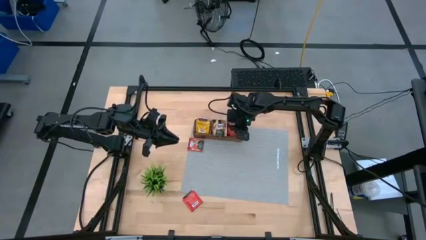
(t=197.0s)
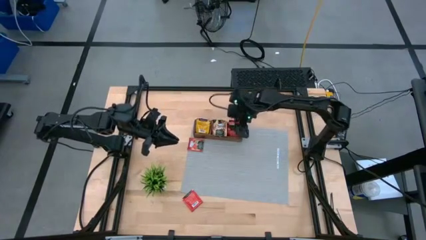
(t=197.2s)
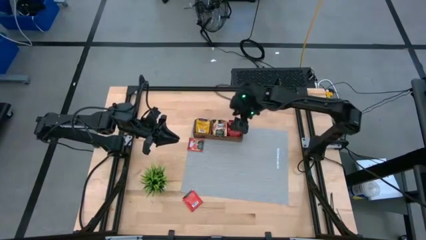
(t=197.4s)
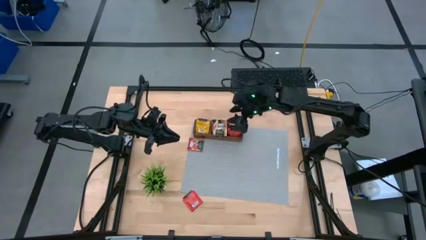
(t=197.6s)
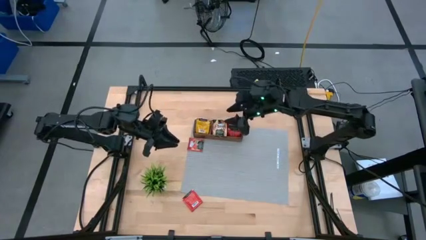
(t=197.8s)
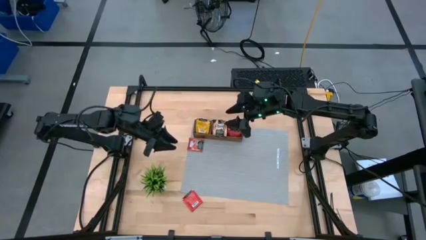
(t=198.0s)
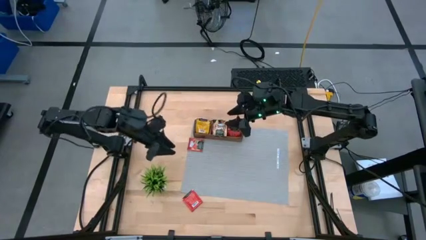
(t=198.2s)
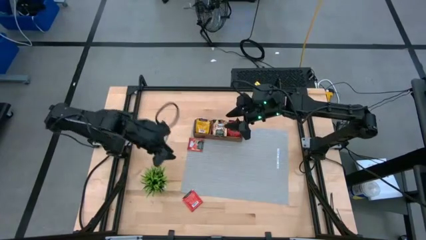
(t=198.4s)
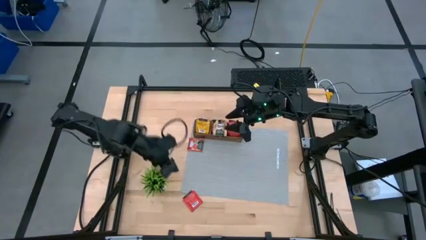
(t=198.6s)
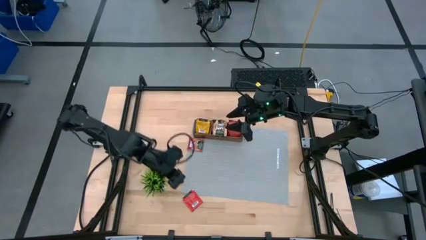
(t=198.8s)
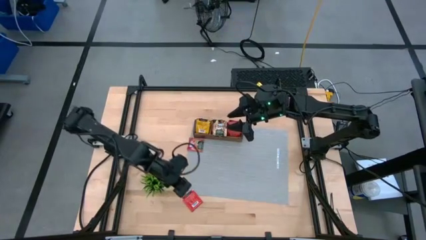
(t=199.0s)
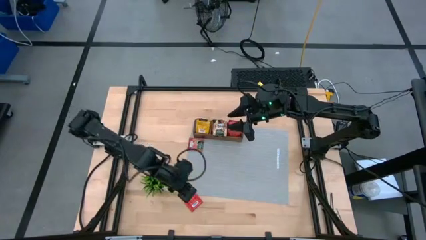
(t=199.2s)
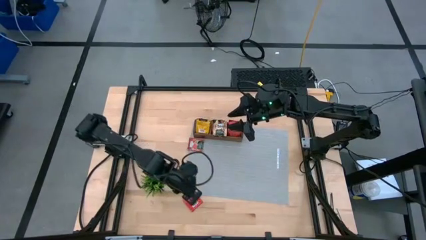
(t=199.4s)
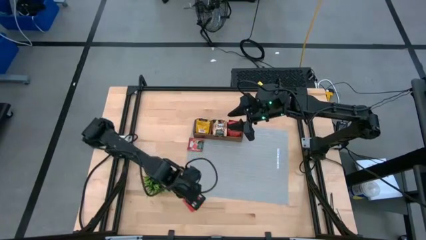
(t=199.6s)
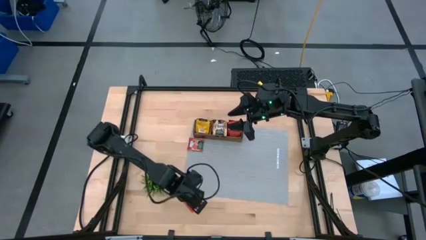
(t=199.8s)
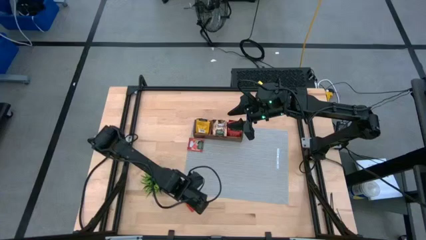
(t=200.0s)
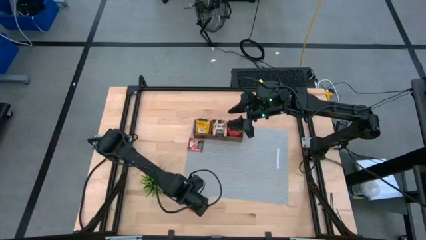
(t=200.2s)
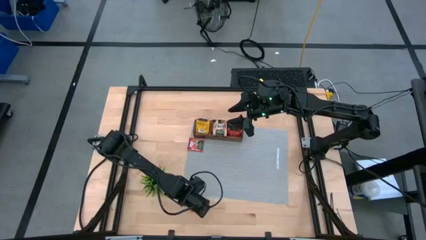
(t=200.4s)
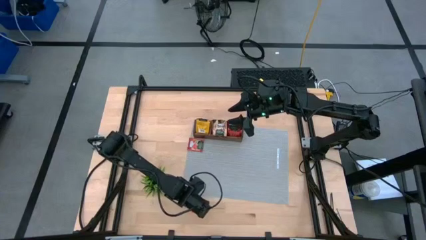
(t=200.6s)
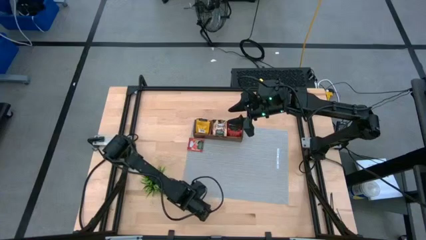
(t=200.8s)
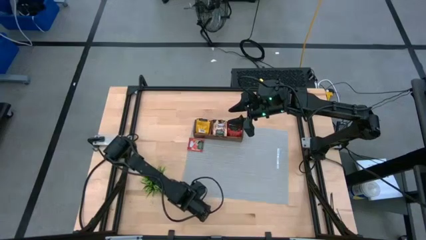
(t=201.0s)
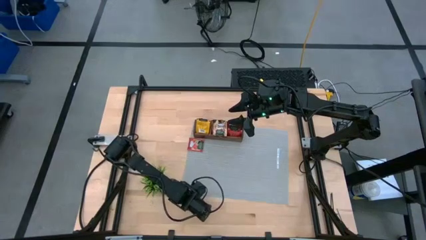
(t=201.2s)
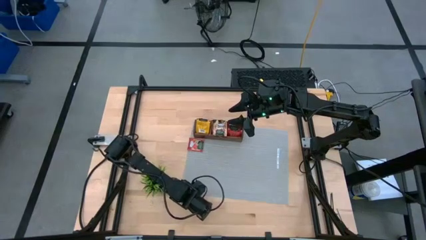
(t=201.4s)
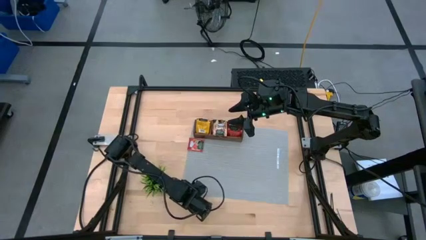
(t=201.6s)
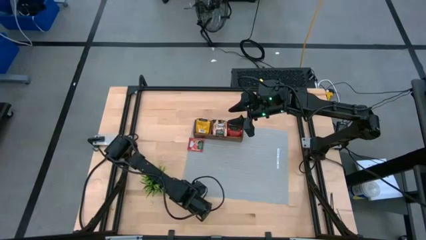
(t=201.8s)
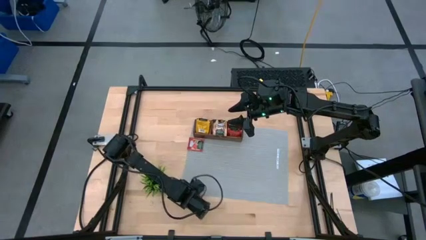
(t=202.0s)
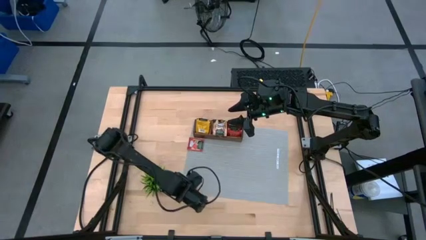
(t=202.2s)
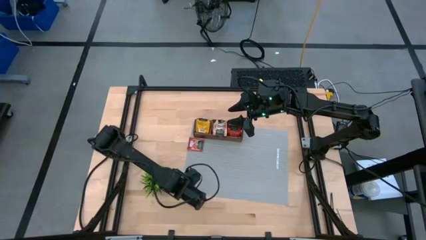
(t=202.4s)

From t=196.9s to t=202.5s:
Task: Pick & Place Tea
Put the red tea bag into the right section of the wooden organizer

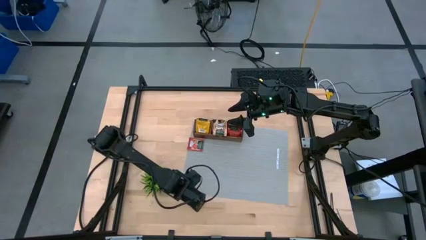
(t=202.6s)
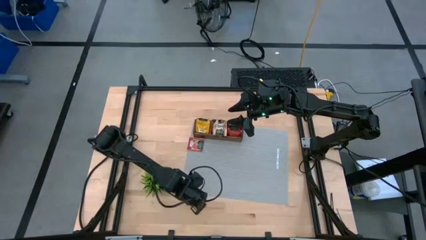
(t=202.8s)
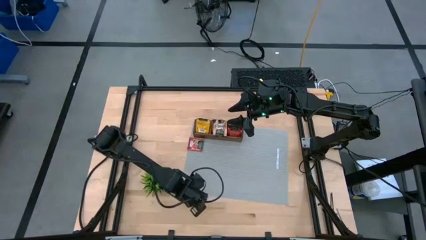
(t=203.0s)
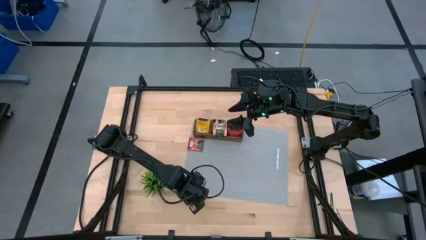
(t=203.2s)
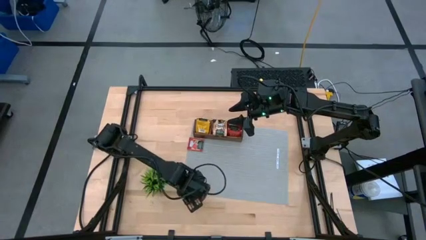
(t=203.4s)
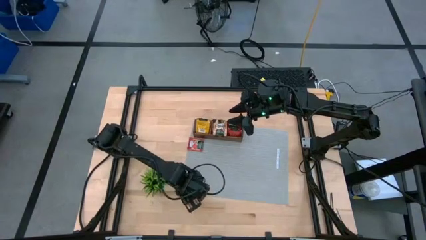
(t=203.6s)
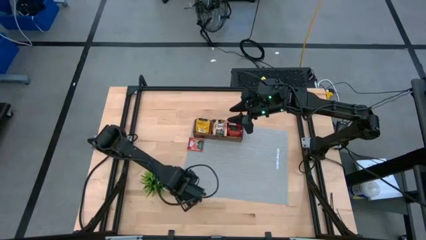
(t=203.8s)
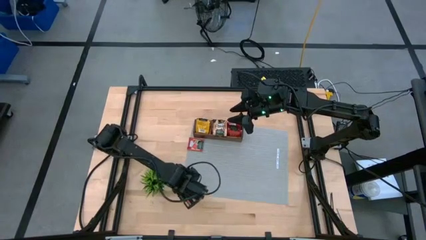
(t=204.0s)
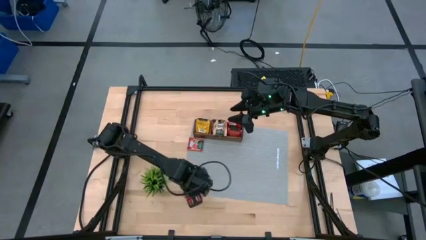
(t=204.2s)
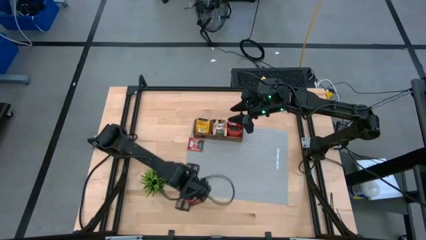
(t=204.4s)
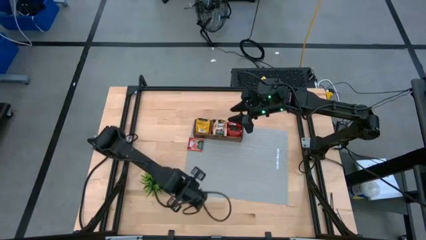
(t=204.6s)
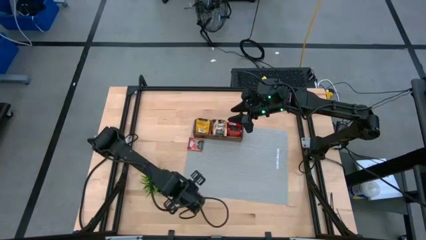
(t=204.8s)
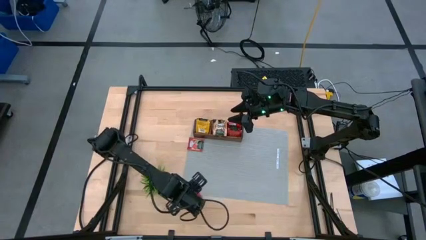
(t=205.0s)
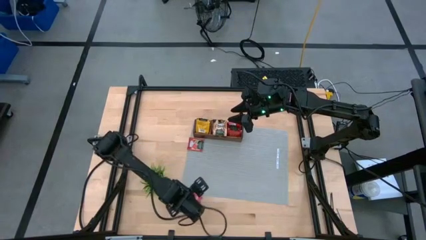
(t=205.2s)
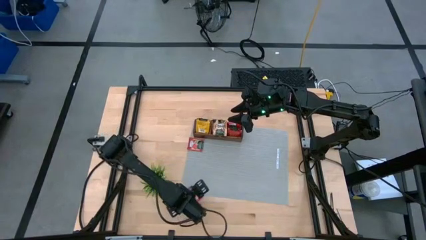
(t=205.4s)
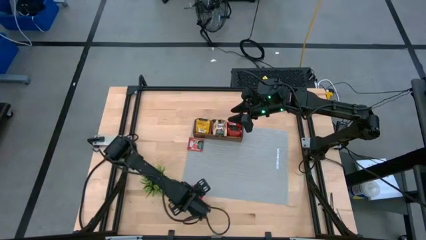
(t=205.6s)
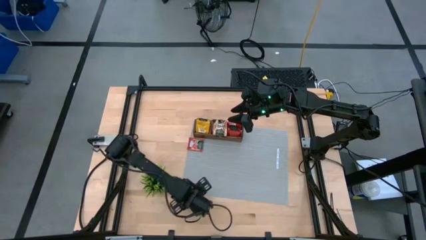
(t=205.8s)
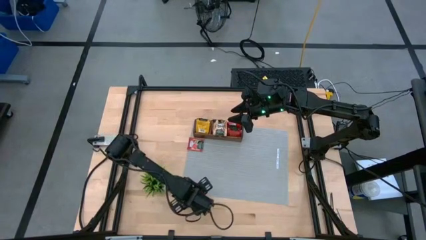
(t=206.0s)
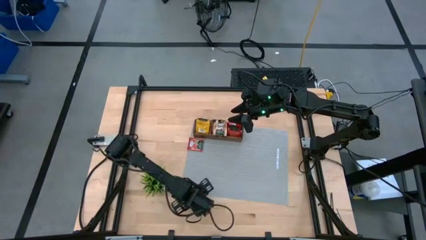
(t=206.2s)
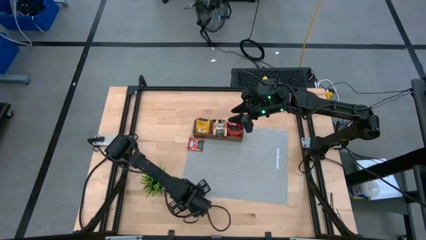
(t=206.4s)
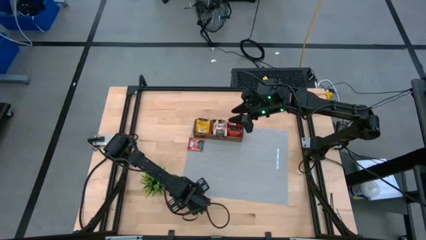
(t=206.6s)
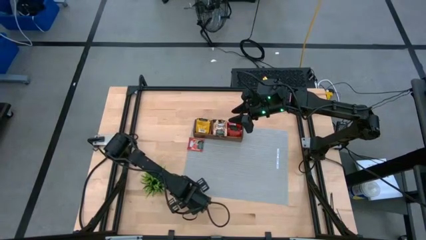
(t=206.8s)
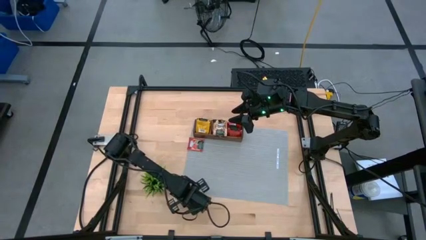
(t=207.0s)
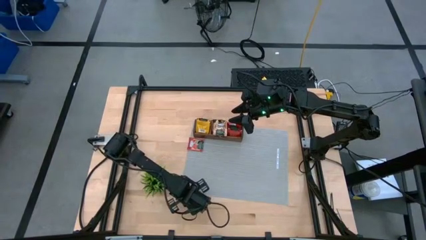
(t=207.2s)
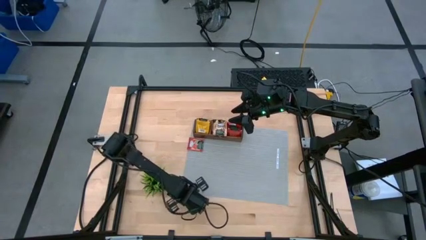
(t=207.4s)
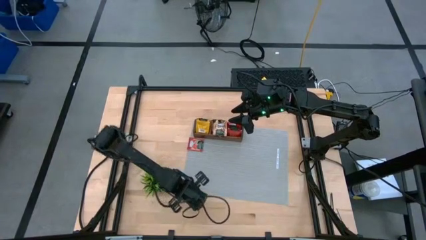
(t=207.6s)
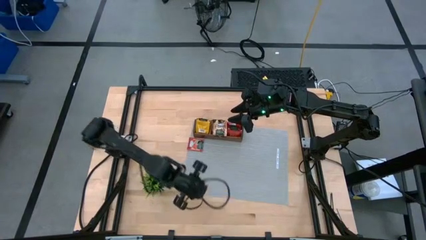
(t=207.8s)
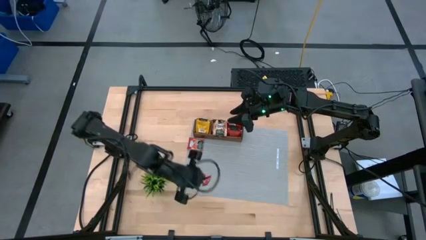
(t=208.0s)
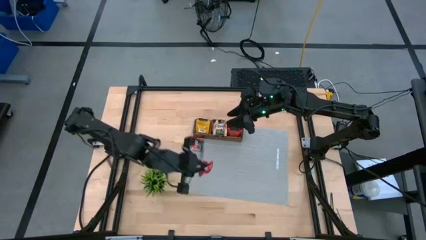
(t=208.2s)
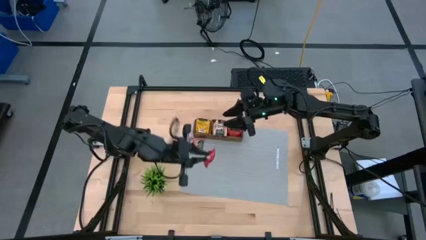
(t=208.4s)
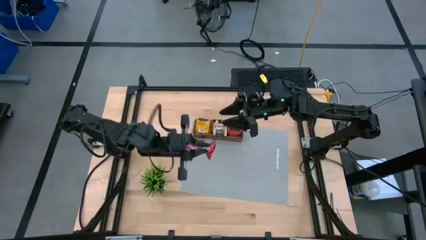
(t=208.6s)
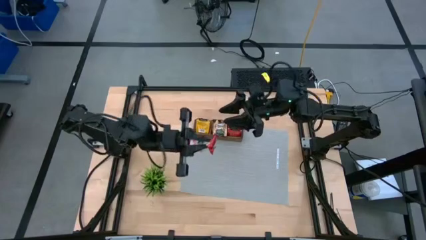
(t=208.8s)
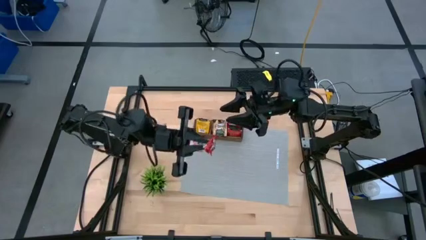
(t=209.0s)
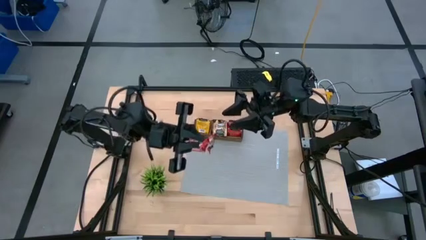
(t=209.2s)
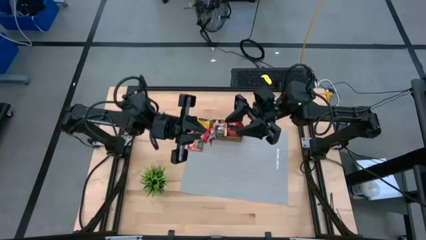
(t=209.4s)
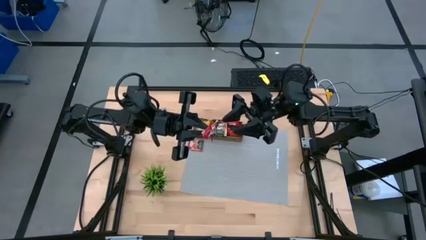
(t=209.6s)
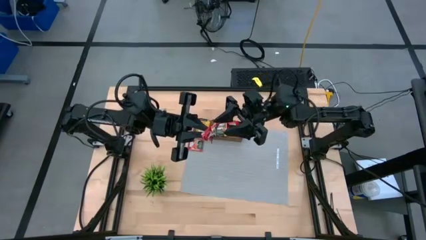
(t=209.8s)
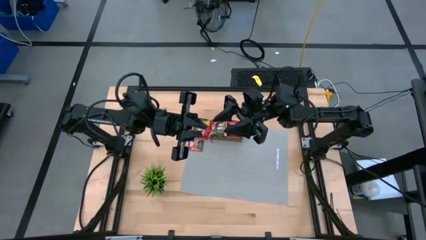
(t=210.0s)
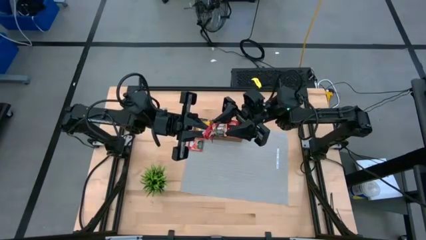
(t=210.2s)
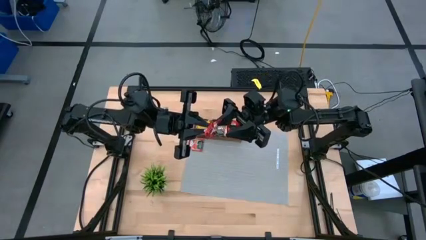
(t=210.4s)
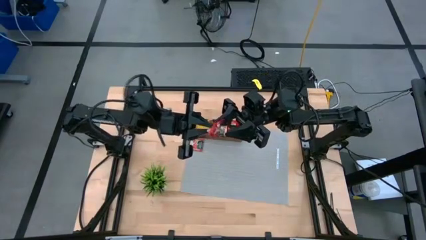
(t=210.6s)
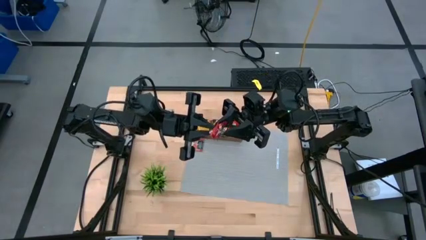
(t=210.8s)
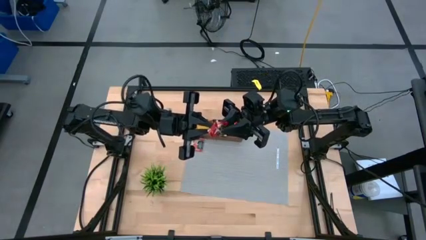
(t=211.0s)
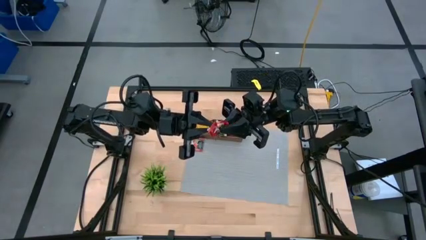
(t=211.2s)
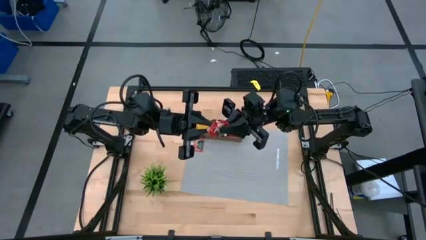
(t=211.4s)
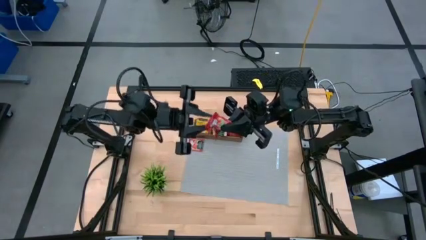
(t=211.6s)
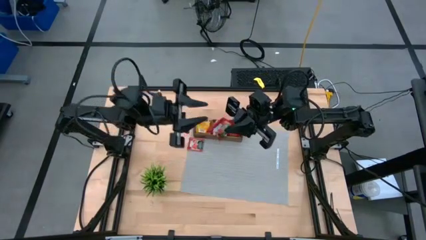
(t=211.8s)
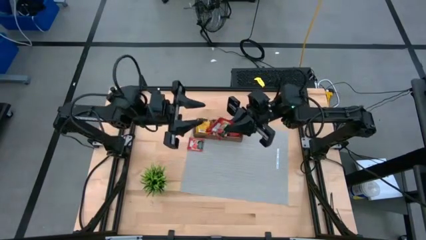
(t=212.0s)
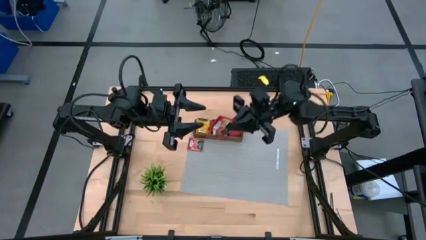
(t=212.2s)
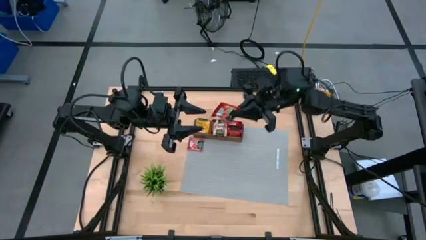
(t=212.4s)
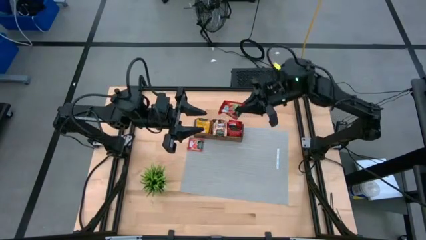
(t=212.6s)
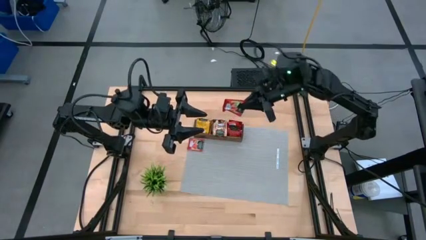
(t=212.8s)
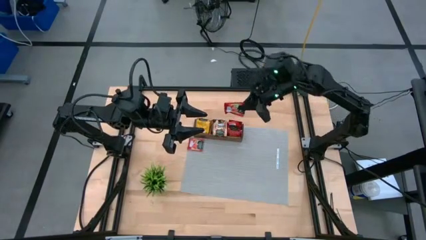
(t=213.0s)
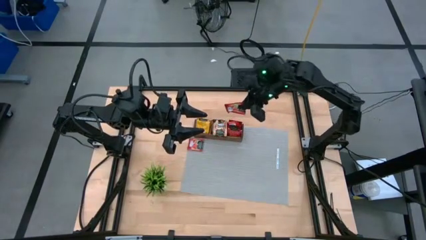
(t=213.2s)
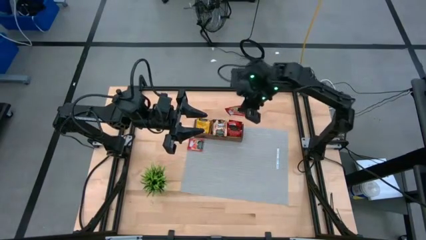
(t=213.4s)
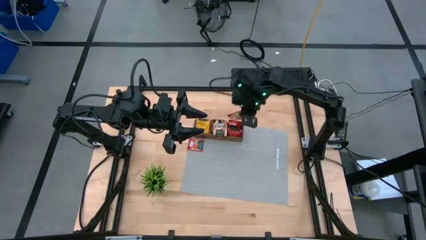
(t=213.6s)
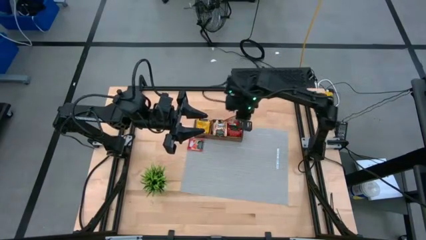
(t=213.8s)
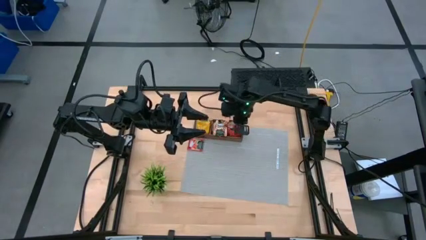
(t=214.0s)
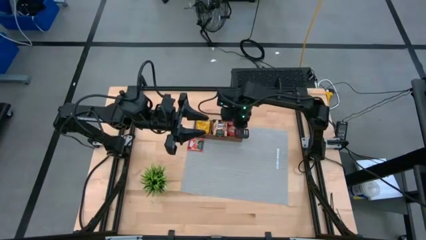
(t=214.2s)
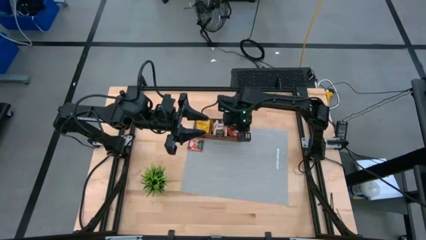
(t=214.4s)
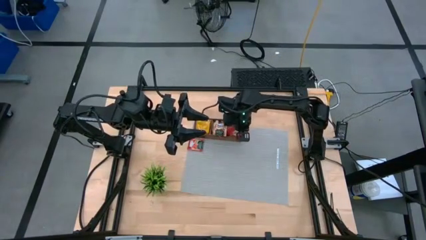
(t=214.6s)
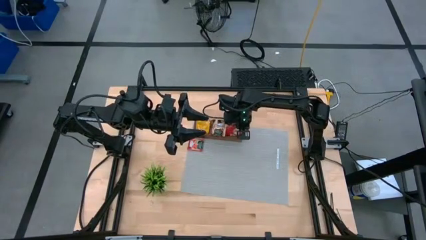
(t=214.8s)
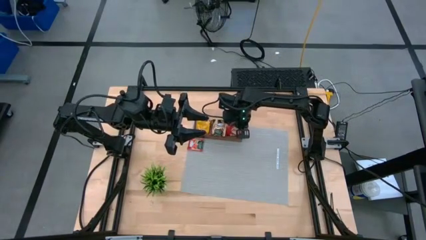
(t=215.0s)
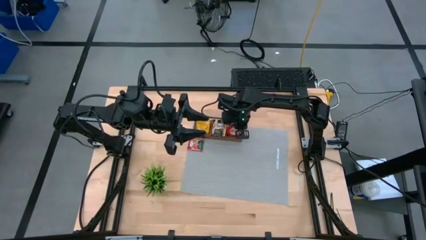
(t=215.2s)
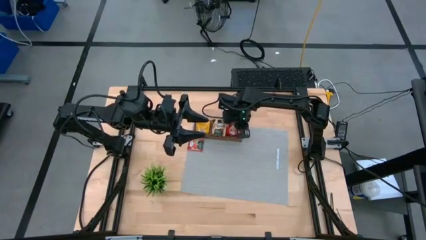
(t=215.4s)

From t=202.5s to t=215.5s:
Put the red tea bag into the right section of the wooden organizer
